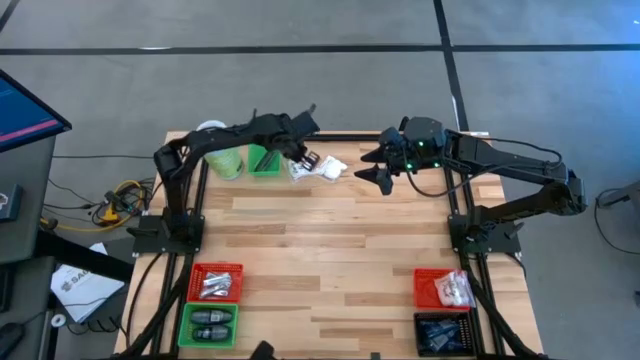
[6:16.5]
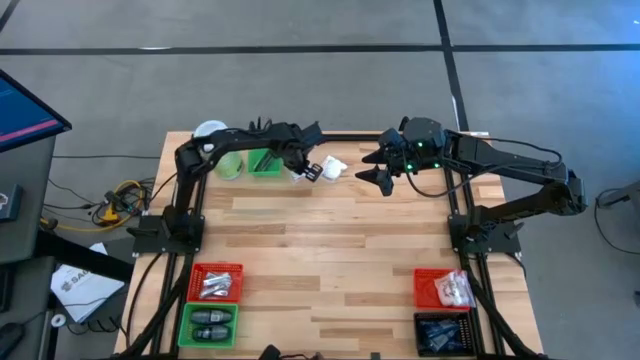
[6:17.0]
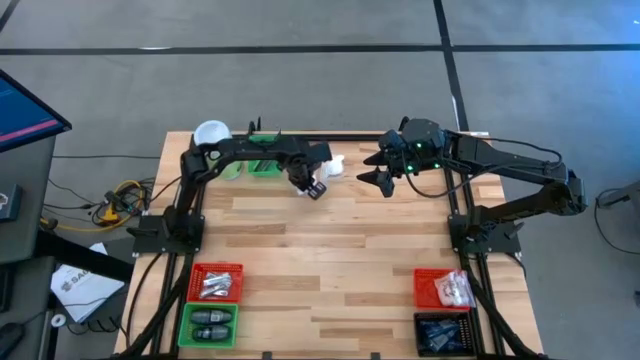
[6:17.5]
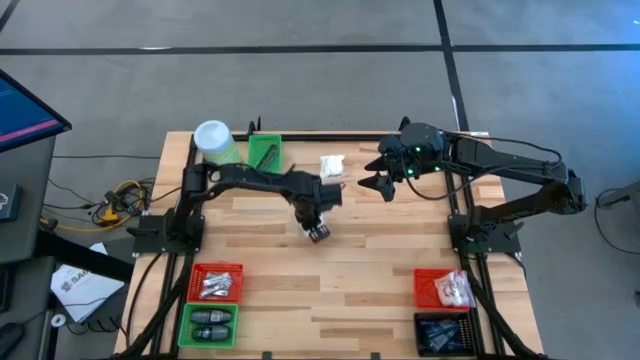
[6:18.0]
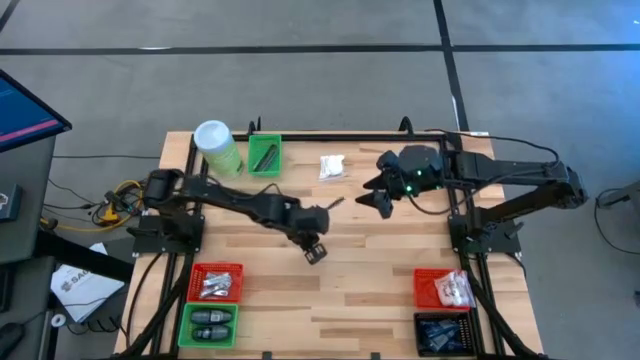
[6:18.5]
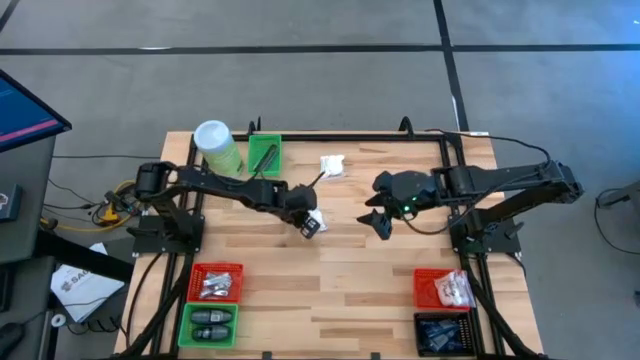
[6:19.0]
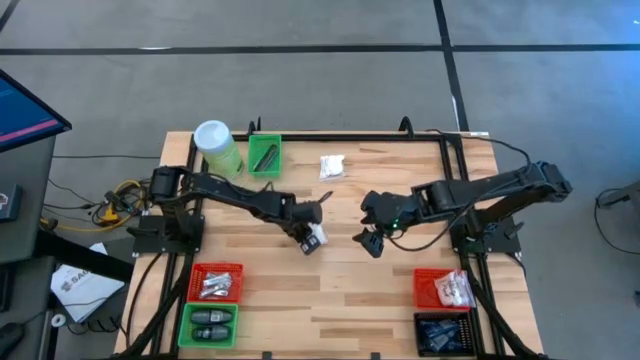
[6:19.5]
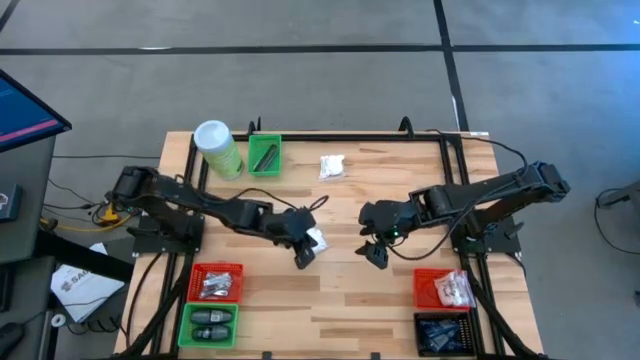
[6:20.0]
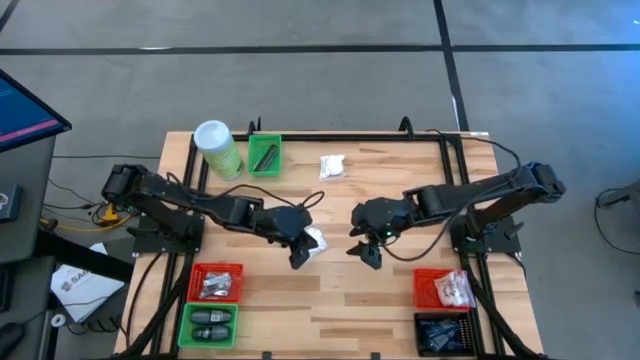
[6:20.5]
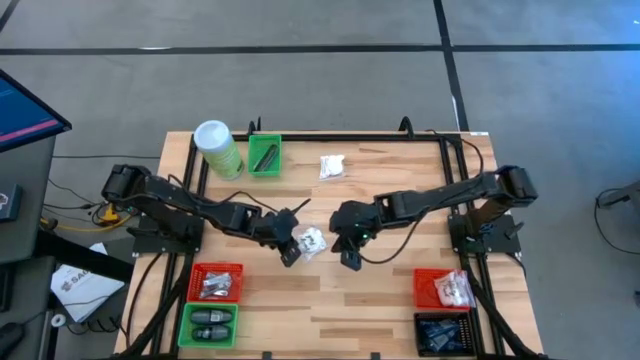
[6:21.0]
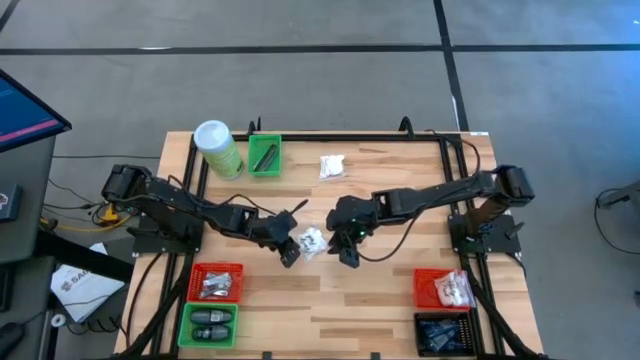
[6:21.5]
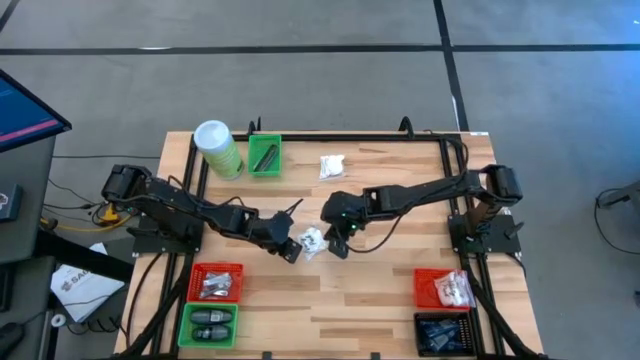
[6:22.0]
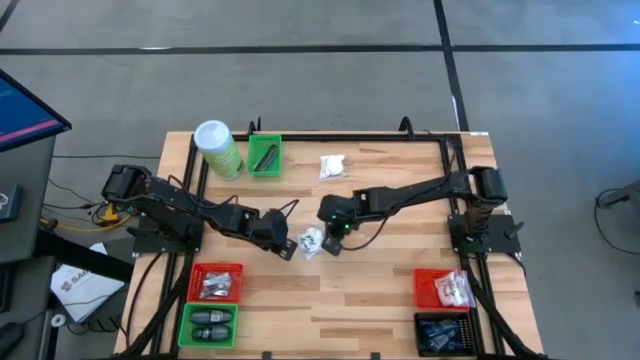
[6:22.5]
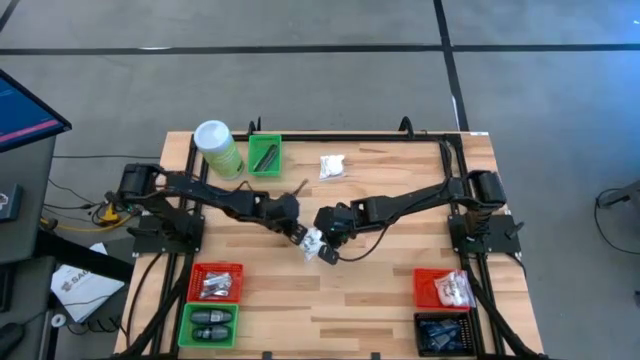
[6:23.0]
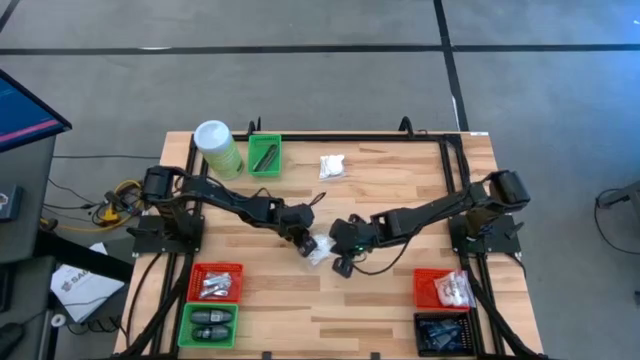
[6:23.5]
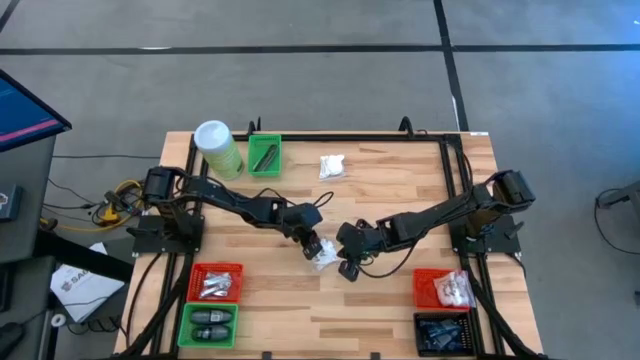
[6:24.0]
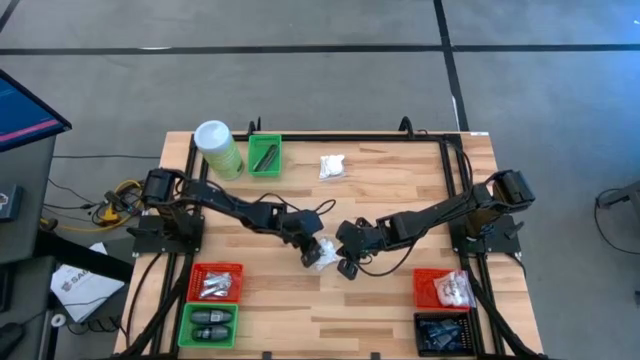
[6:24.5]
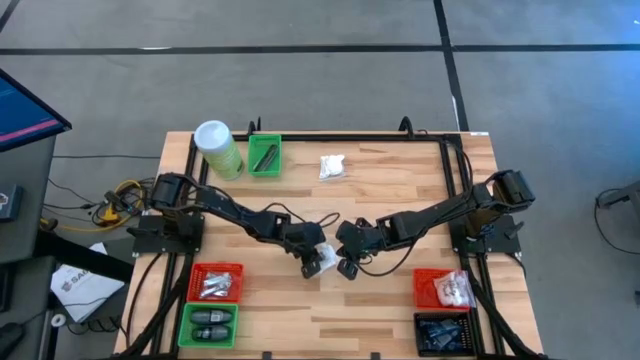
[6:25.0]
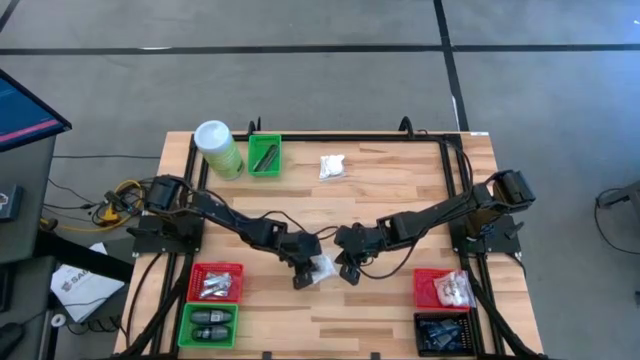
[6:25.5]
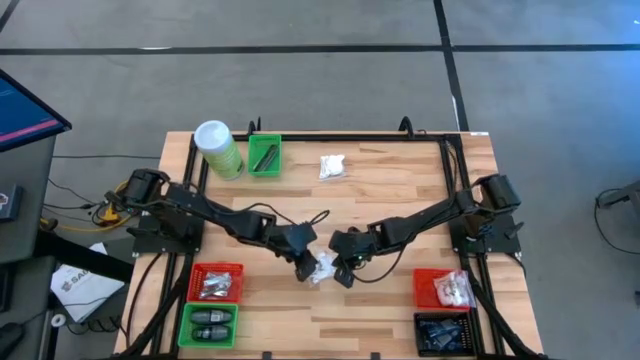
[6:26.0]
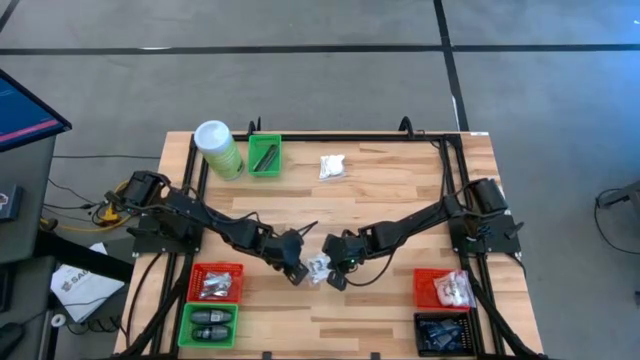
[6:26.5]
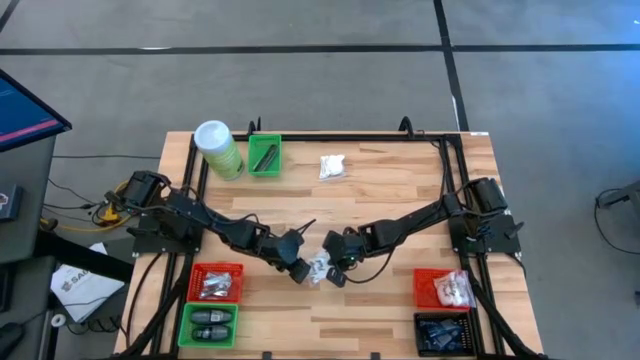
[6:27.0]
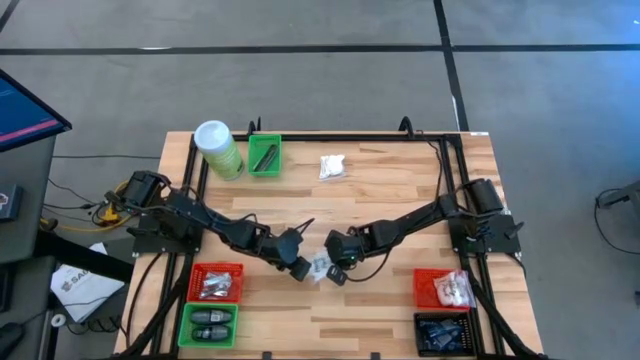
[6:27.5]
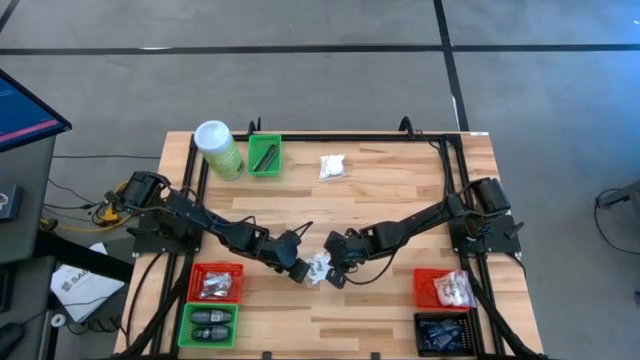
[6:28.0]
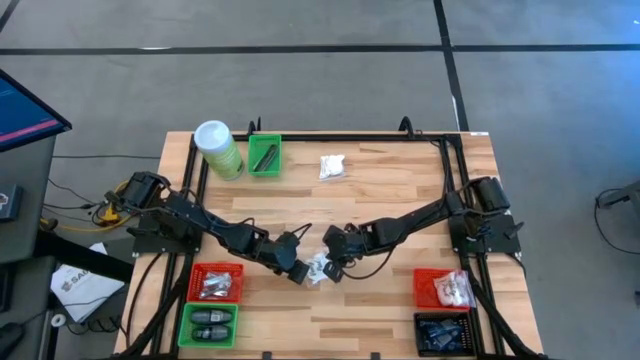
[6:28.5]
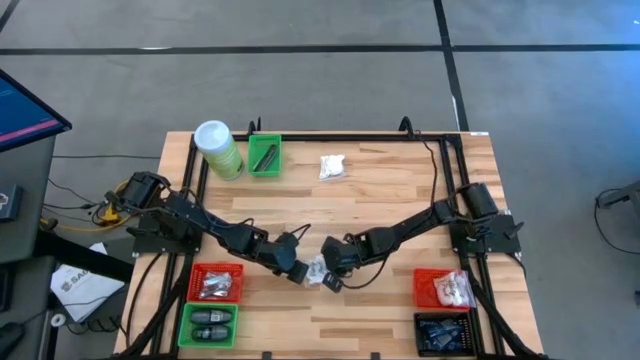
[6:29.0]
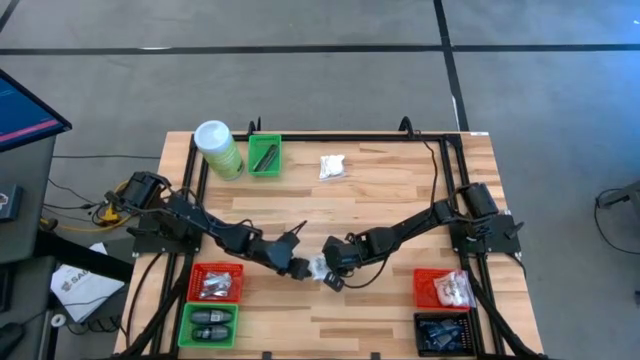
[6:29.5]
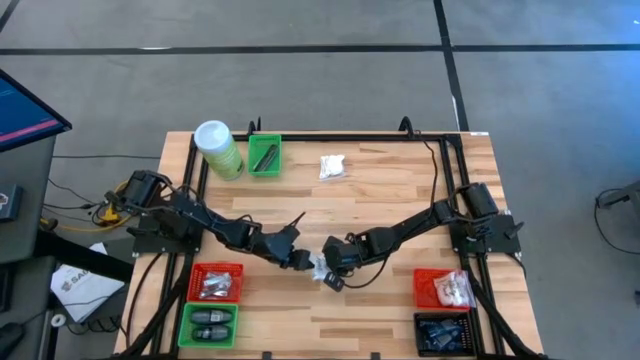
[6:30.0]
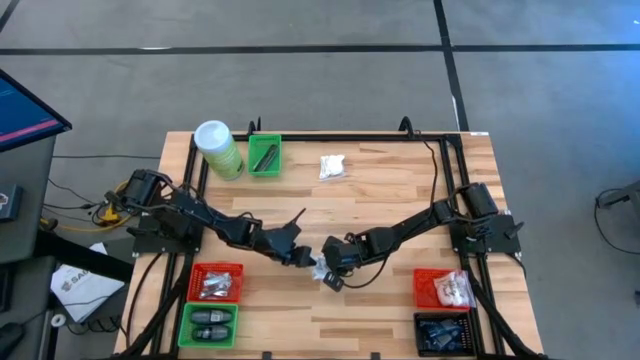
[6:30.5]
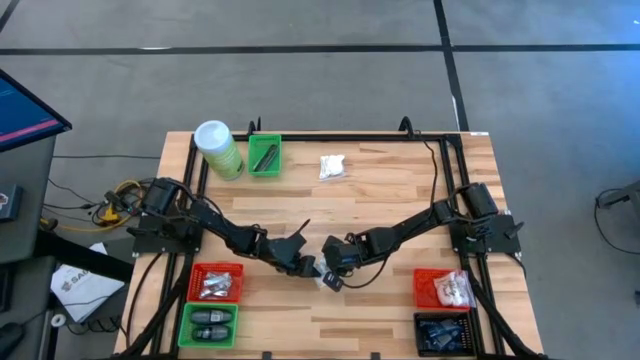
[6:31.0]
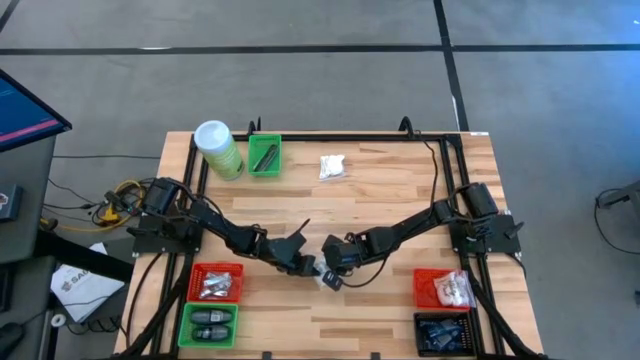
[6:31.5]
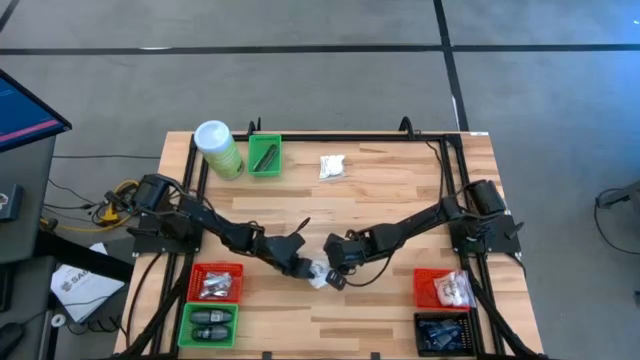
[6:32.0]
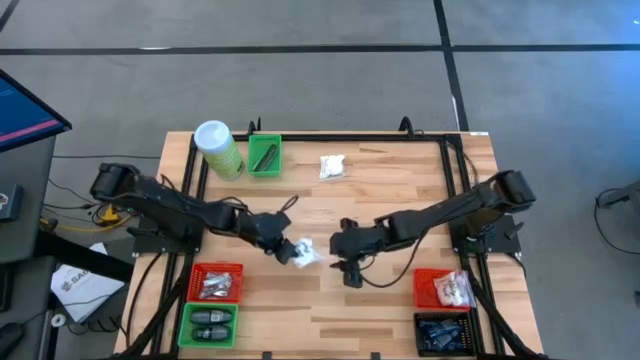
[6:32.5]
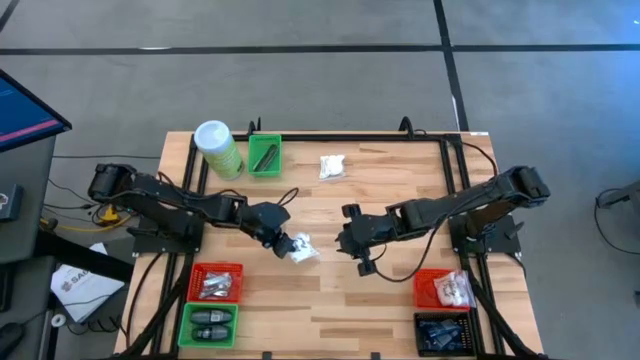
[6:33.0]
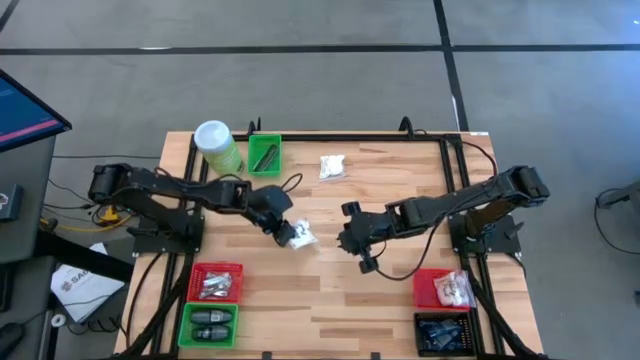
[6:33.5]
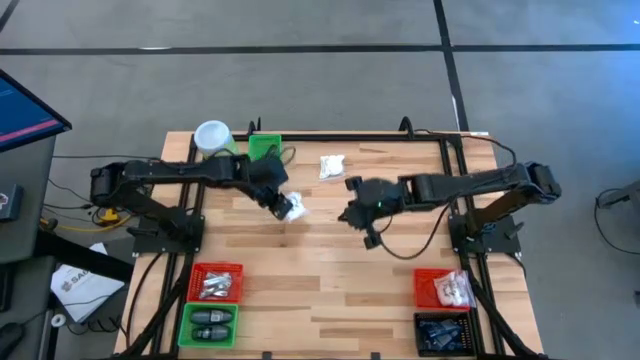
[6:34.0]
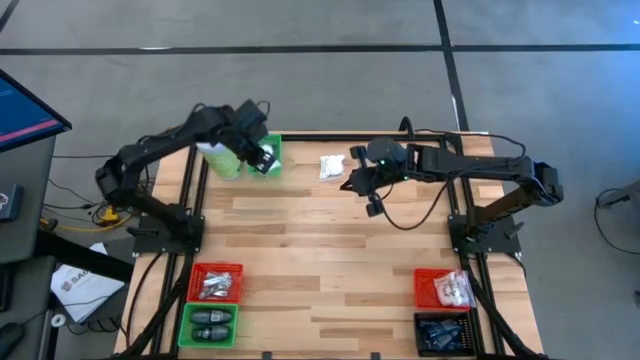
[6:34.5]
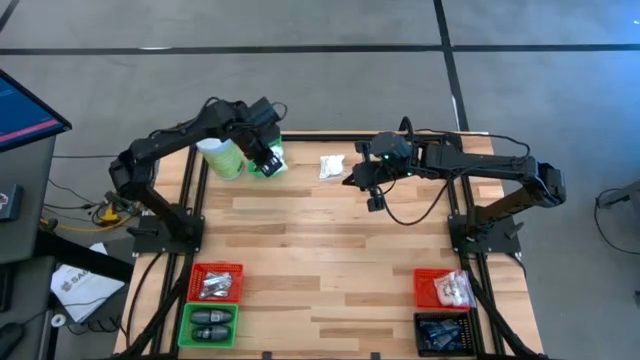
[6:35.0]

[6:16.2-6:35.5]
Task: Pick & Place Travel size toiletries
Put the cotton pack into the right red bin

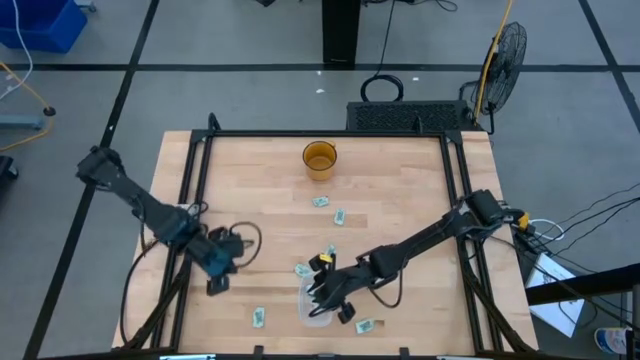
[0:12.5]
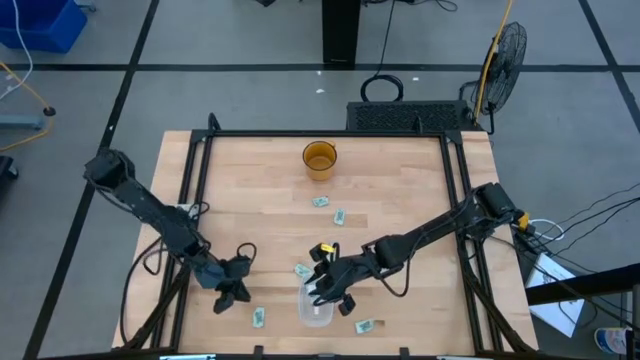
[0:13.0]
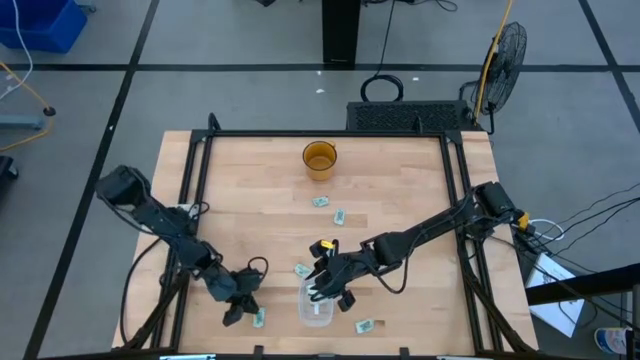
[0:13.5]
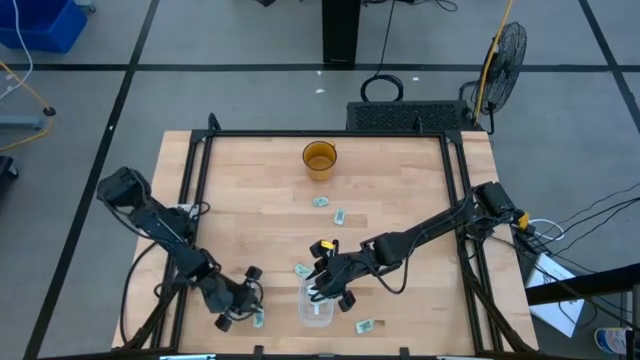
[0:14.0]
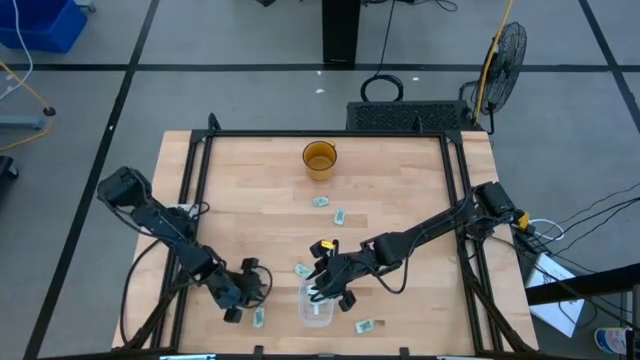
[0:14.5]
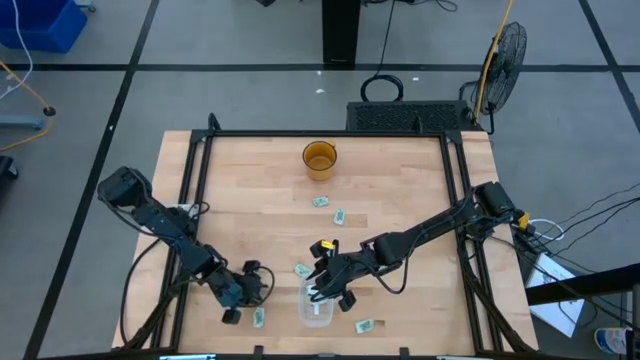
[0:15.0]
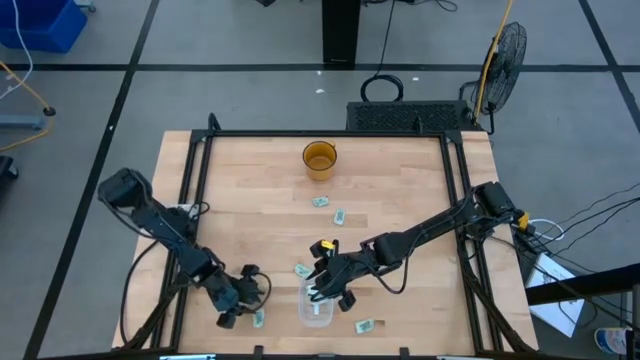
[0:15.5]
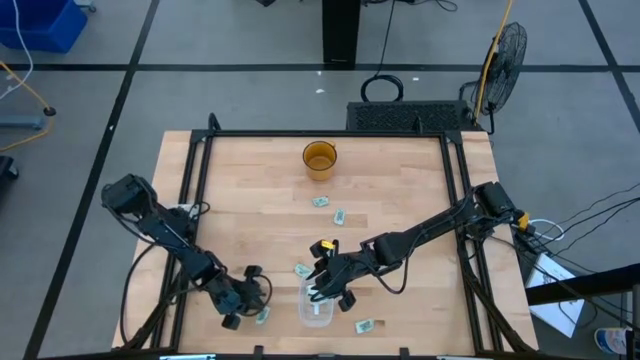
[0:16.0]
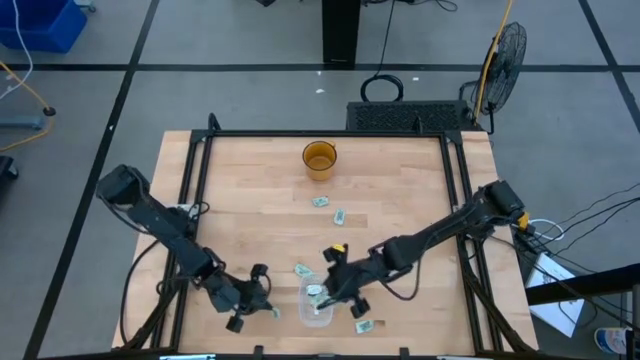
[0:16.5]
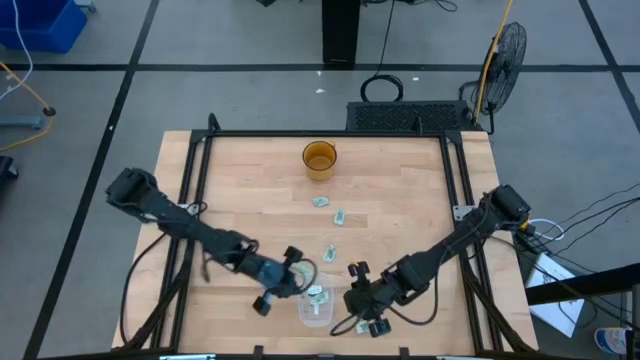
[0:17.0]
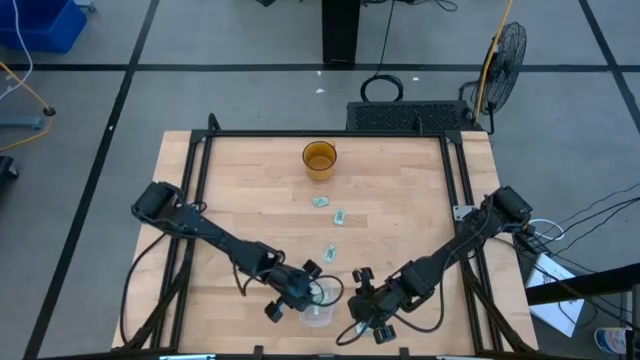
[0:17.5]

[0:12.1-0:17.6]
Task: Pick and place Stevia / Truvia into bins
Put the green stevia packet into the transparent container
